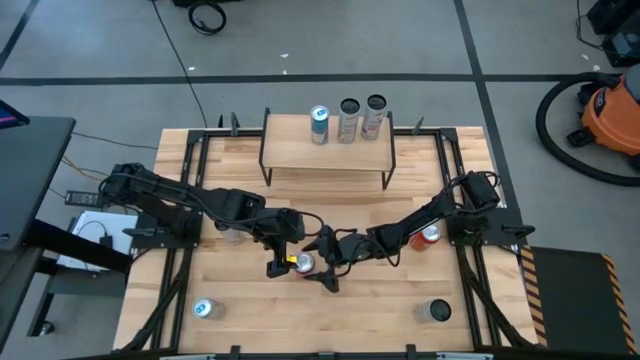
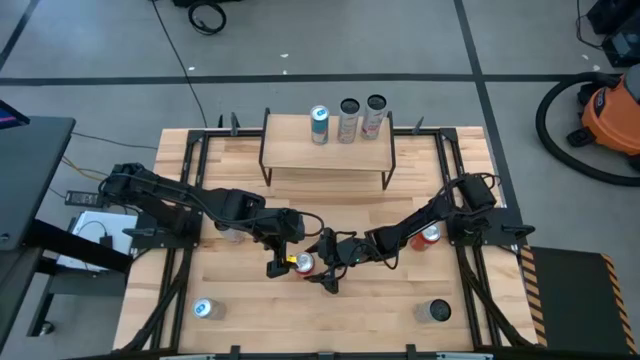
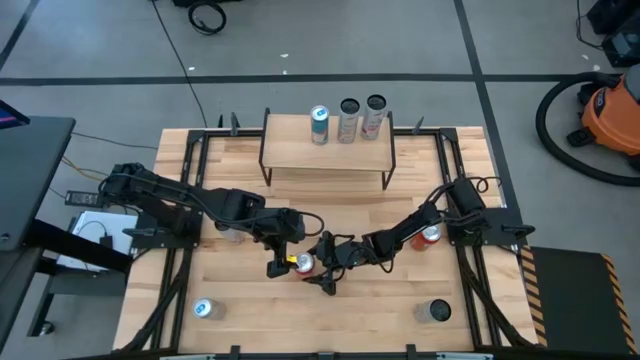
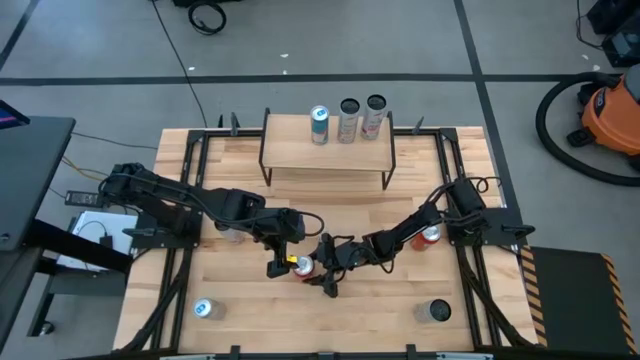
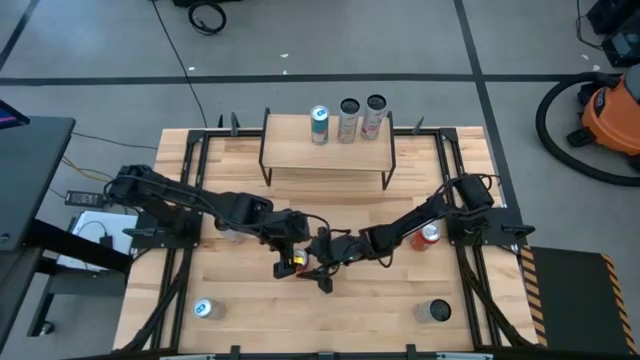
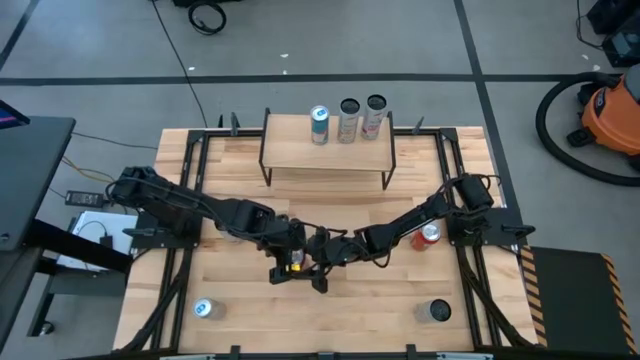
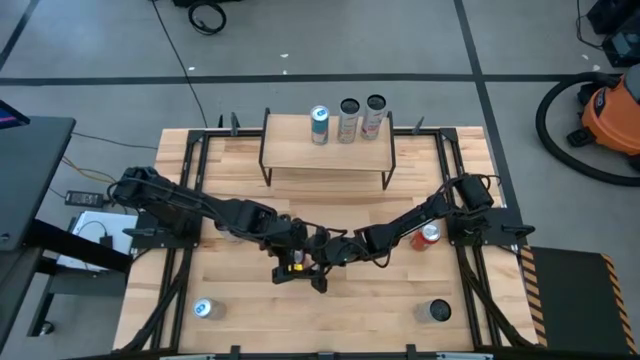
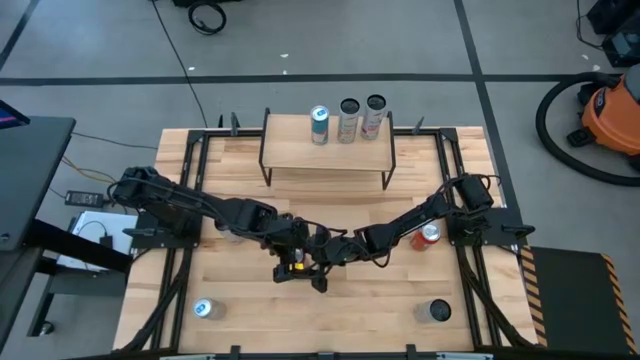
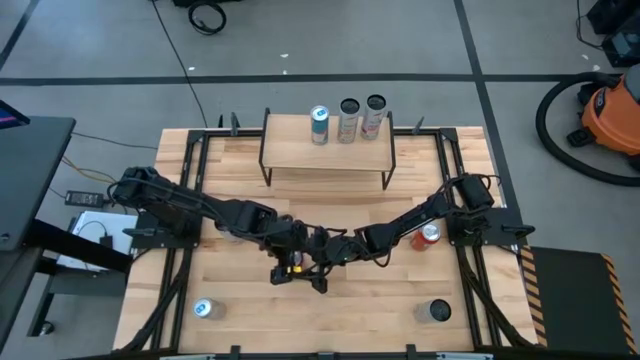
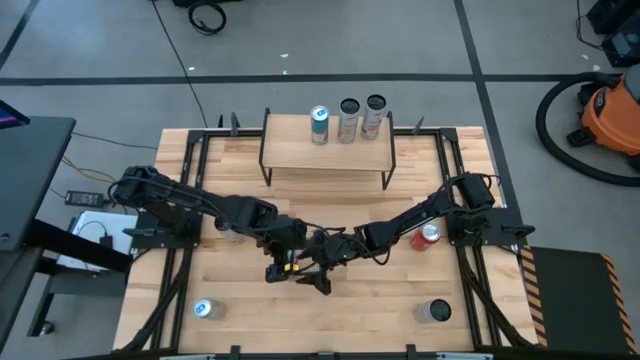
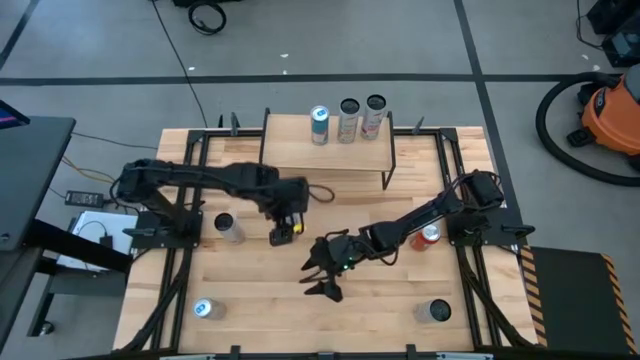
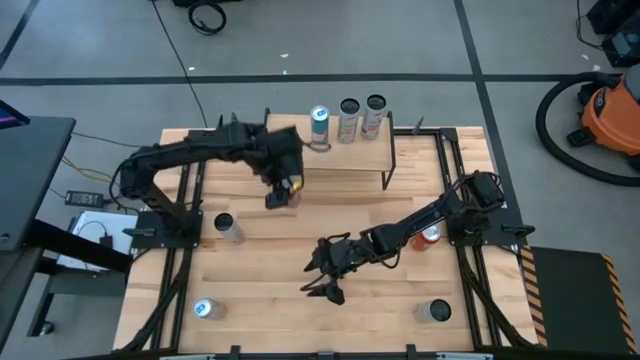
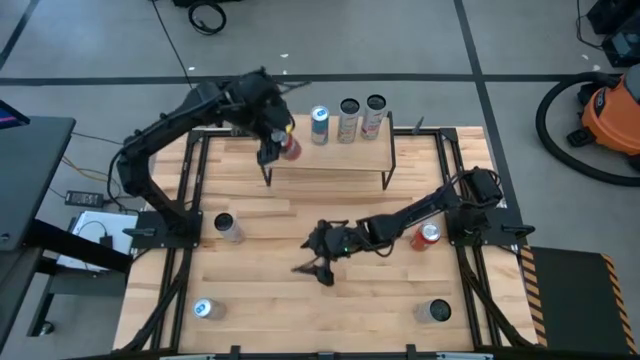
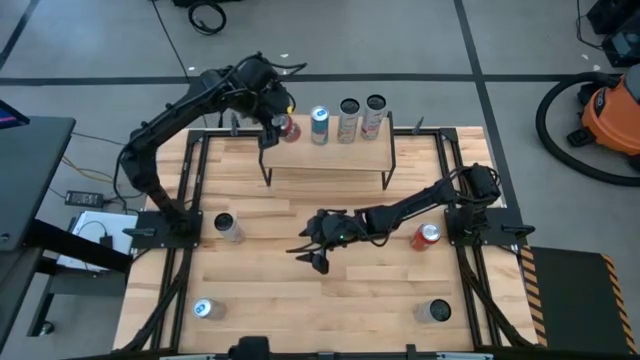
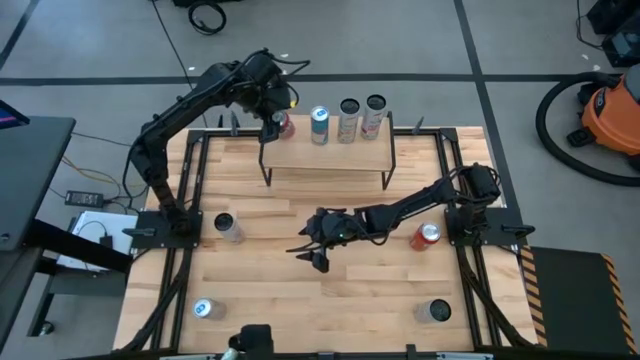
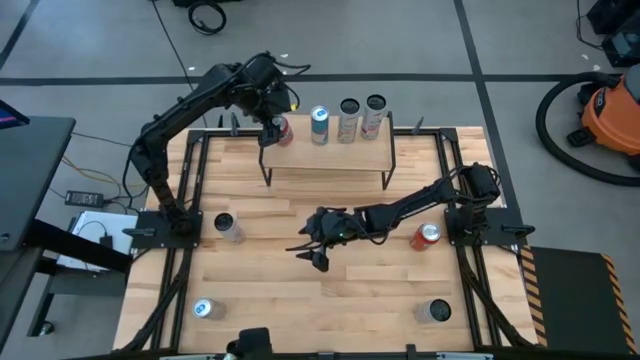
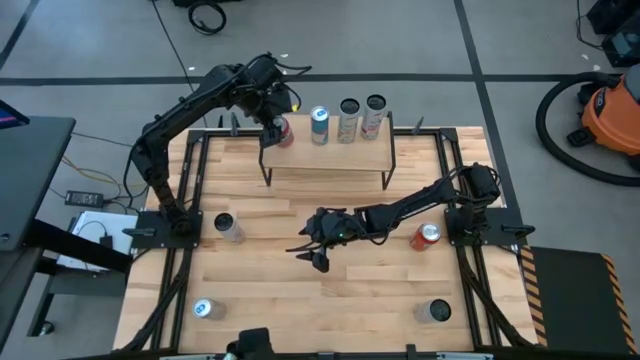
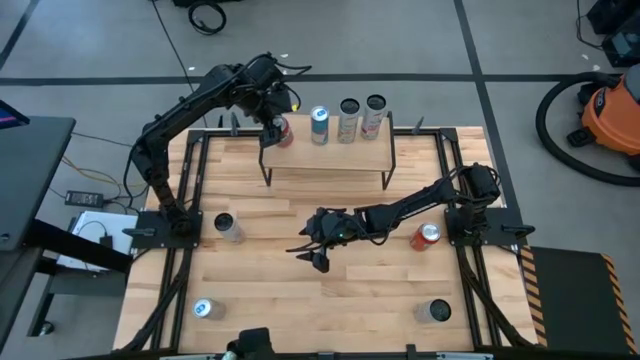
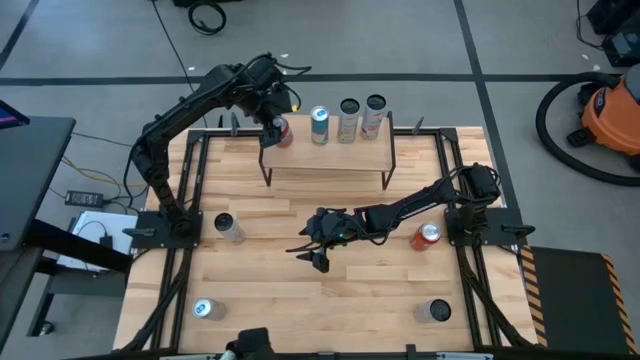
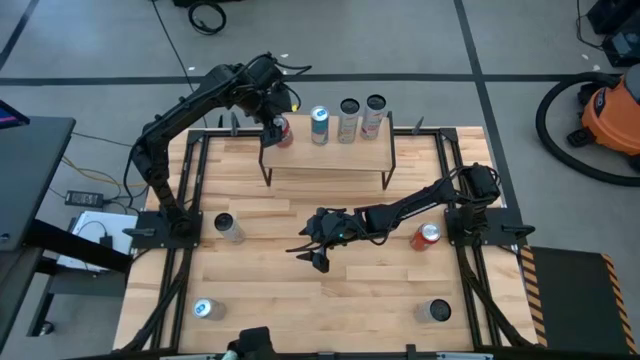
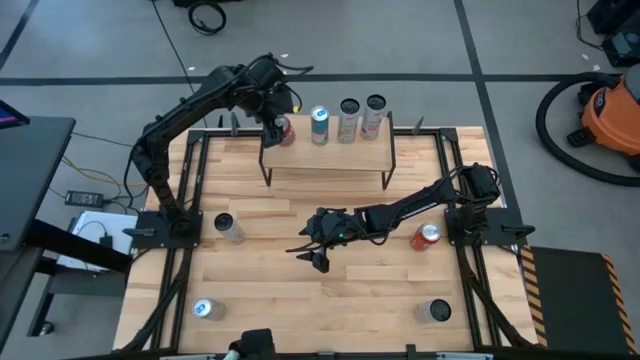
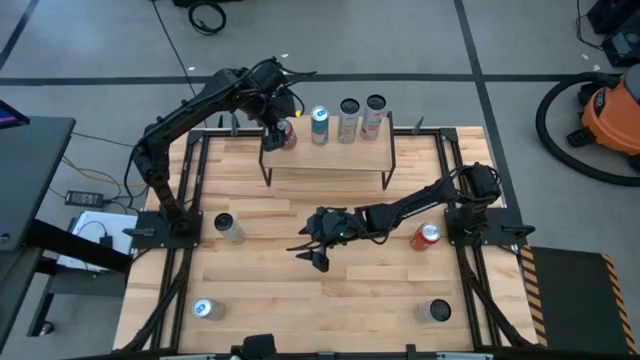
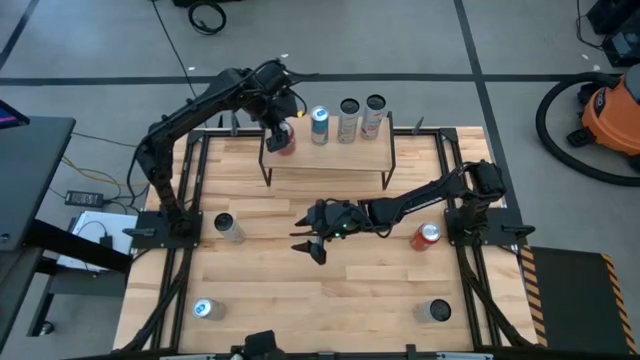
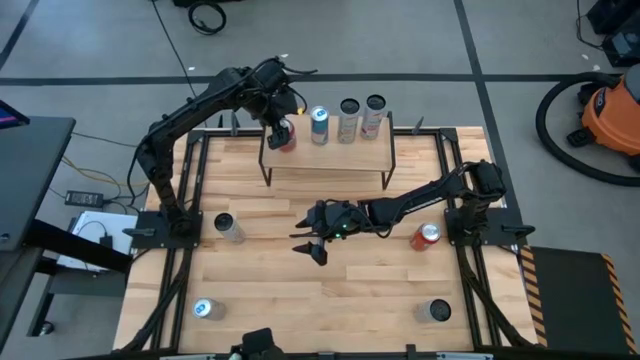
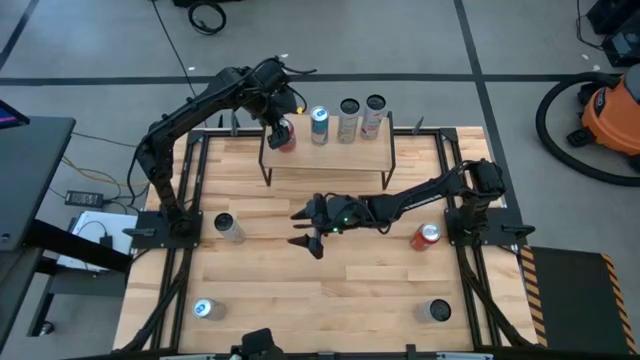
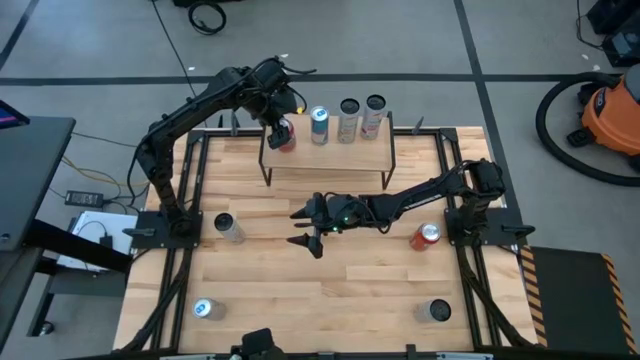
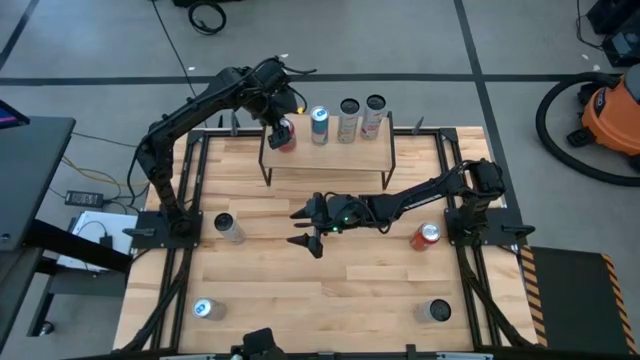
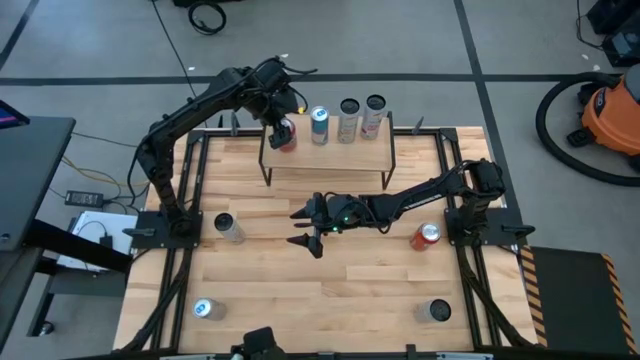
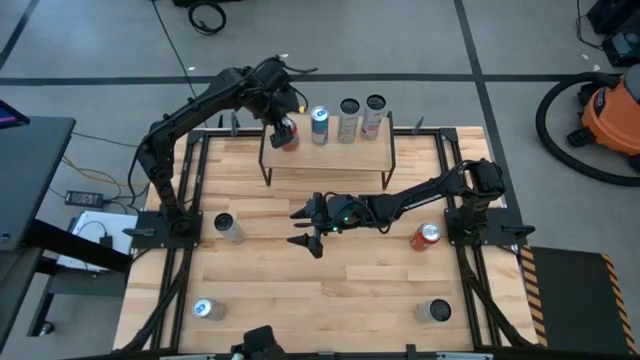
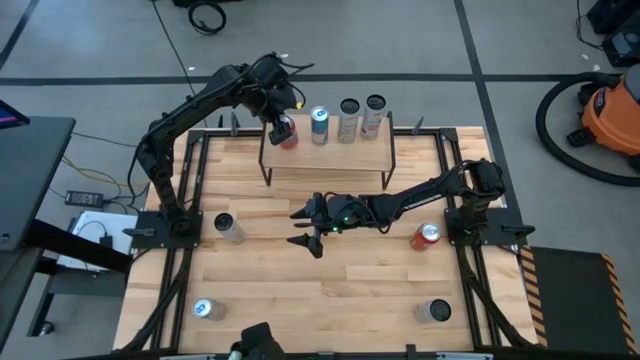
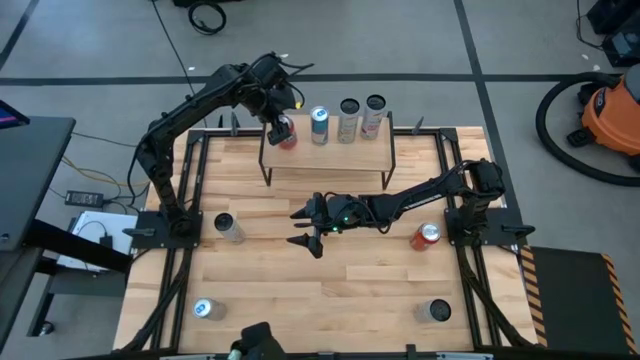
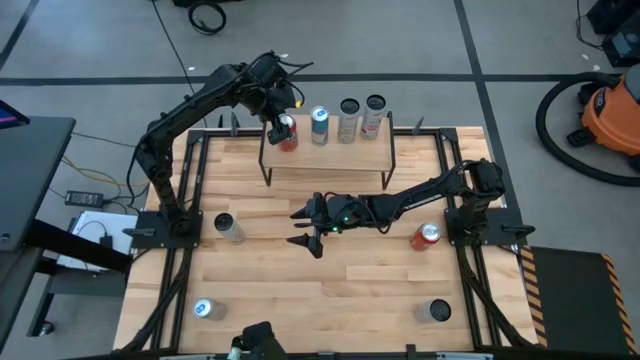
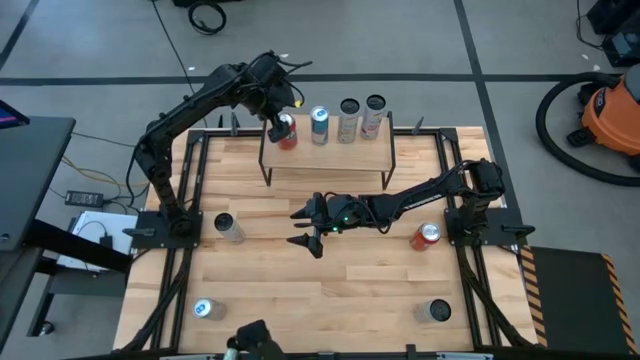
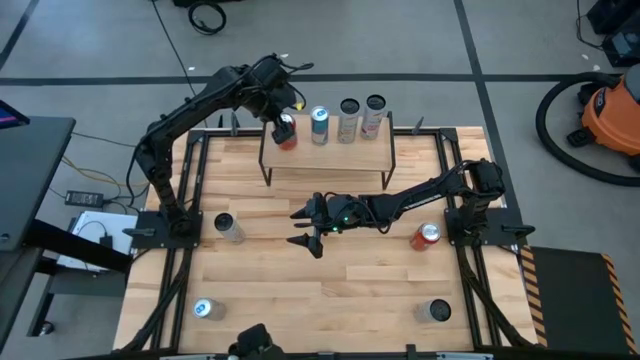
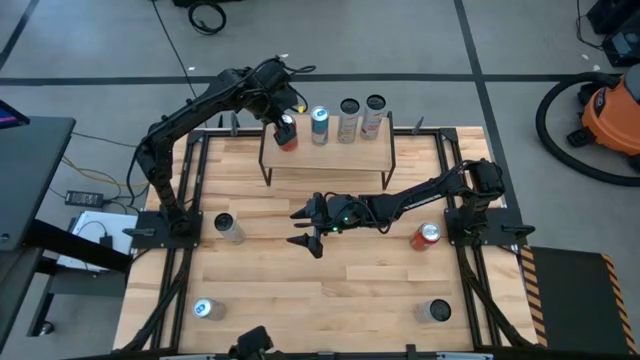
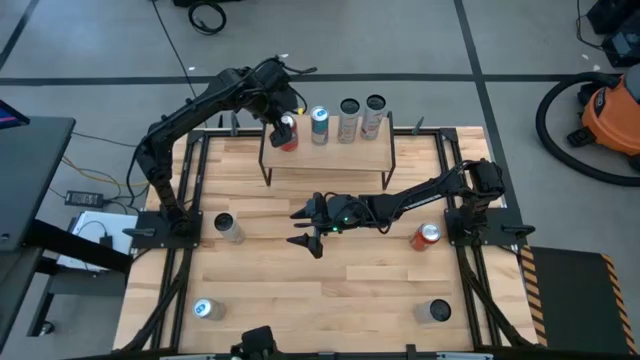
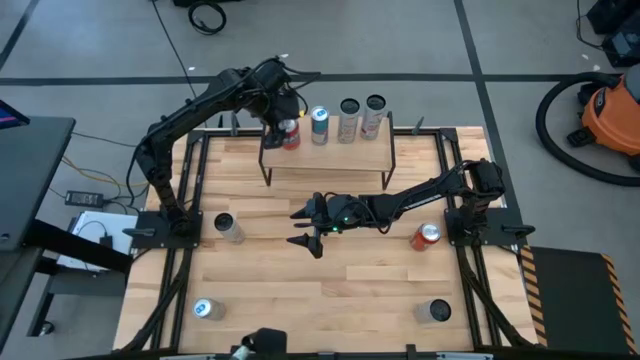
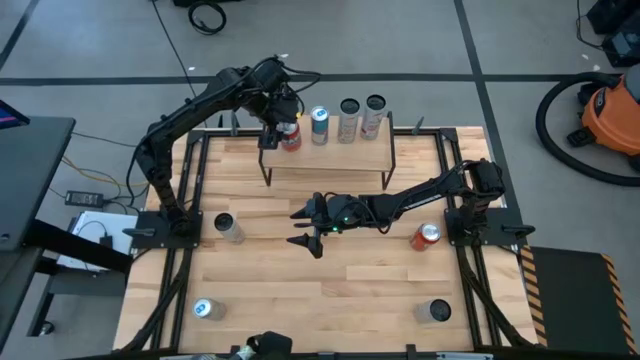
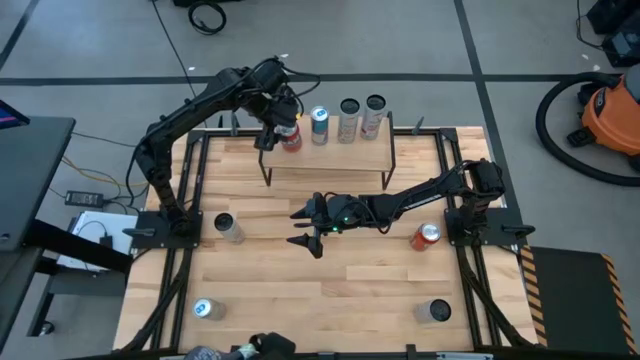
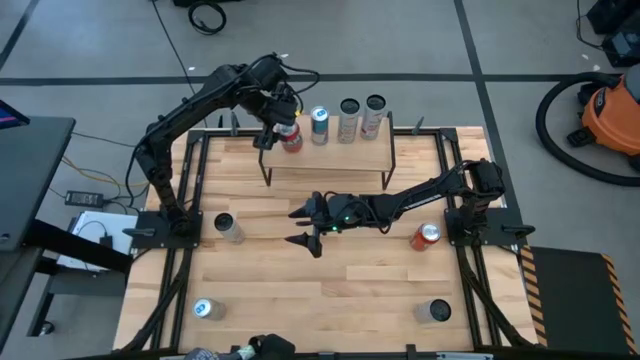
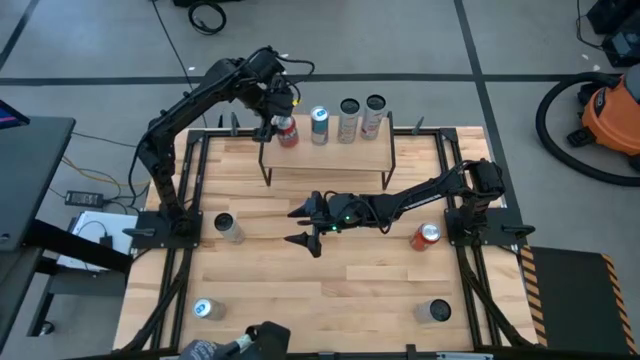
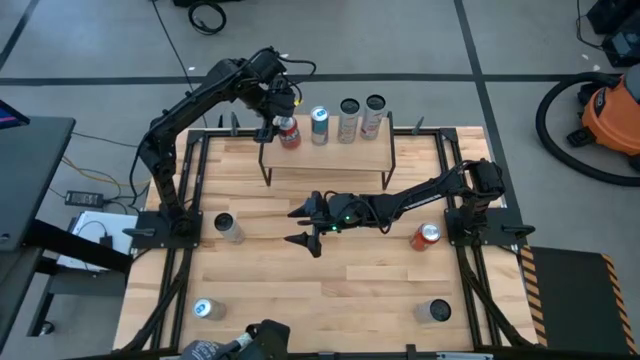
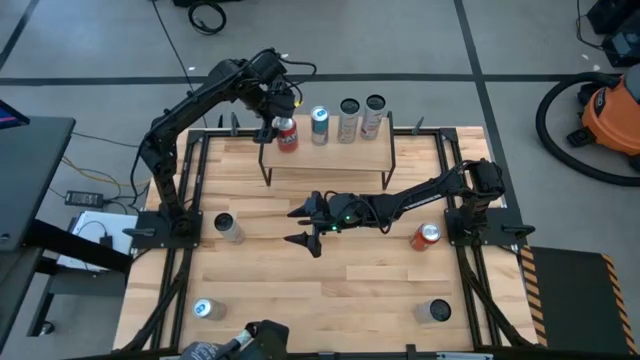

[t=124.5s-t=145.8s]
Task: Place canned beverage on shelf
Put the left red soda can on the shelf
